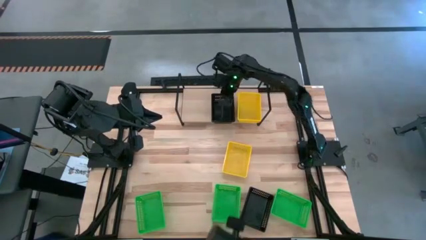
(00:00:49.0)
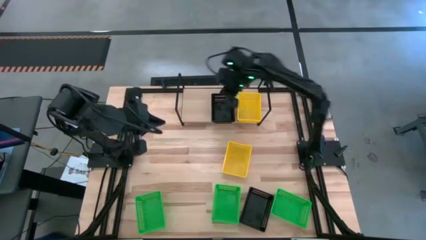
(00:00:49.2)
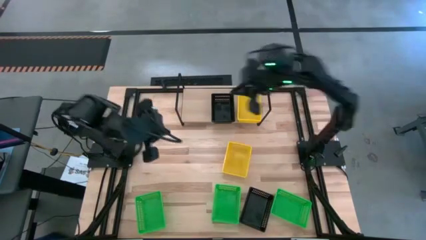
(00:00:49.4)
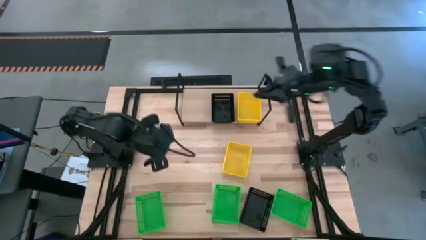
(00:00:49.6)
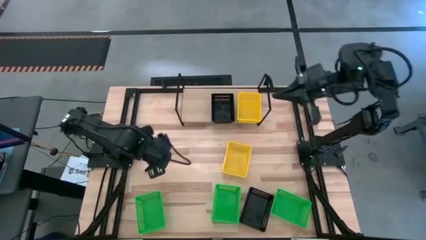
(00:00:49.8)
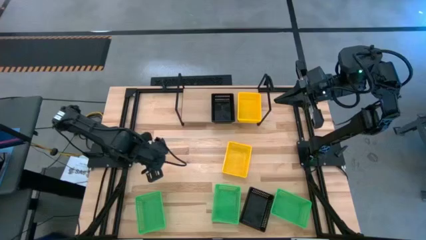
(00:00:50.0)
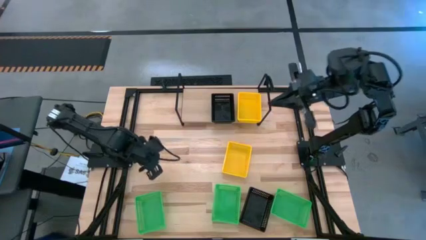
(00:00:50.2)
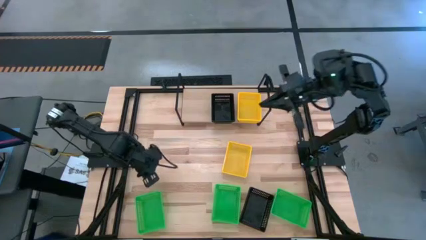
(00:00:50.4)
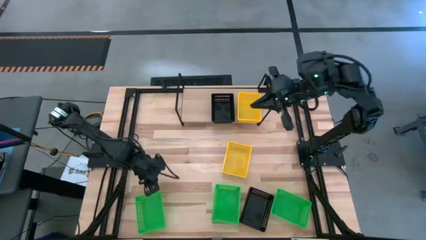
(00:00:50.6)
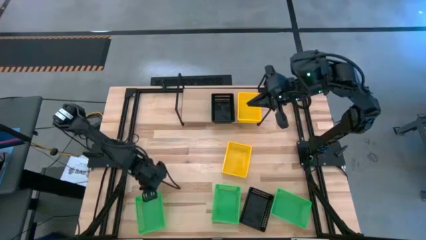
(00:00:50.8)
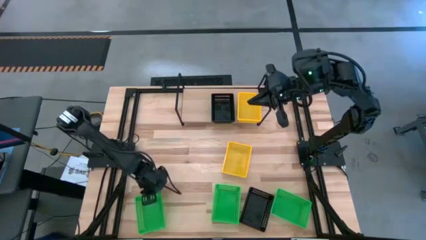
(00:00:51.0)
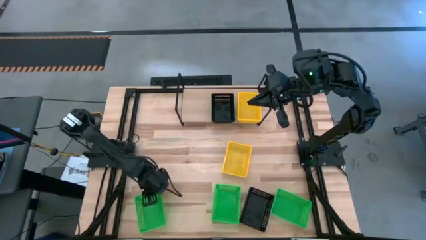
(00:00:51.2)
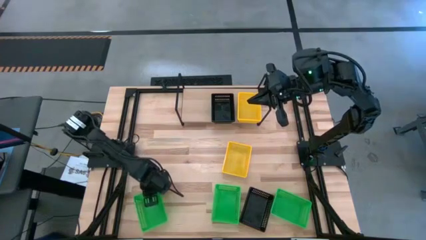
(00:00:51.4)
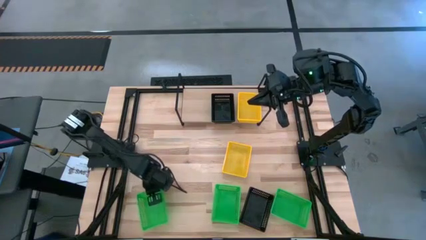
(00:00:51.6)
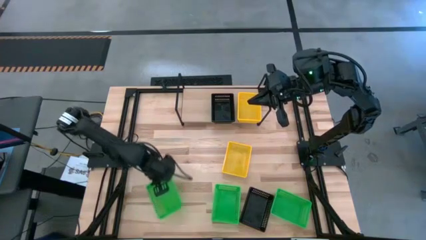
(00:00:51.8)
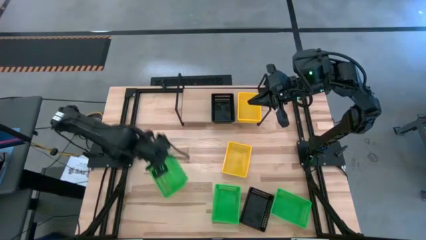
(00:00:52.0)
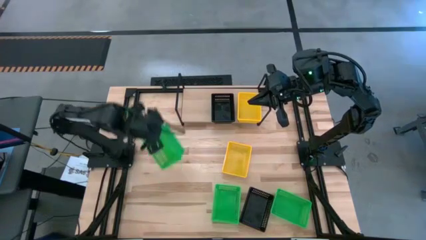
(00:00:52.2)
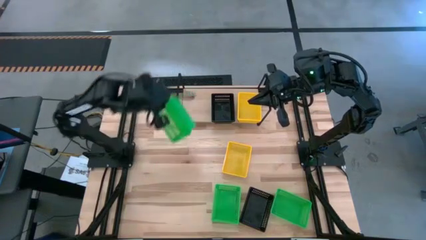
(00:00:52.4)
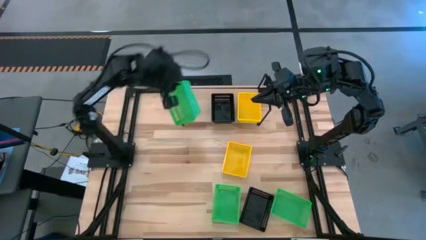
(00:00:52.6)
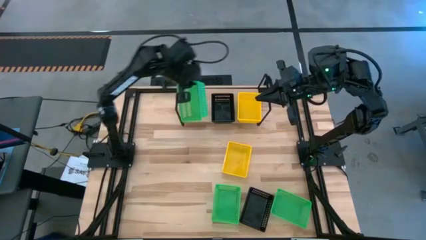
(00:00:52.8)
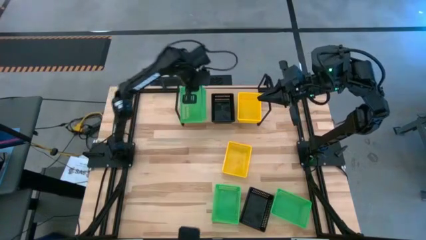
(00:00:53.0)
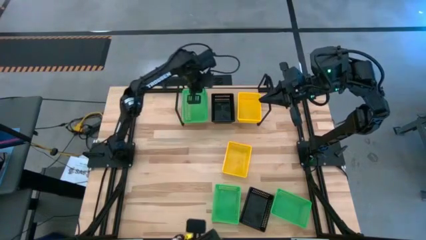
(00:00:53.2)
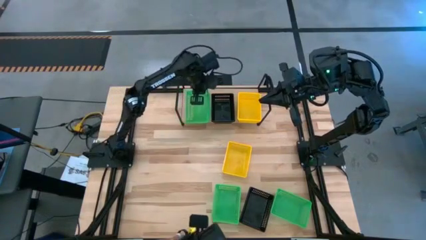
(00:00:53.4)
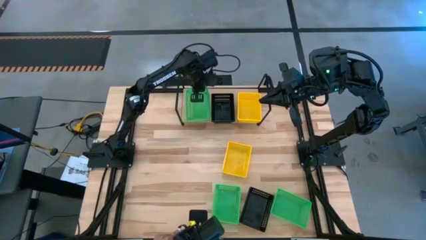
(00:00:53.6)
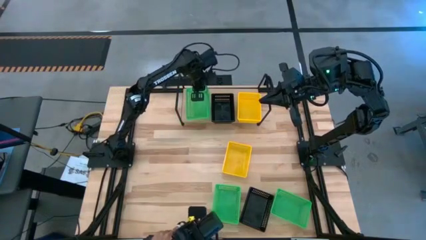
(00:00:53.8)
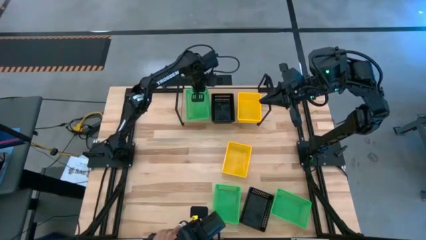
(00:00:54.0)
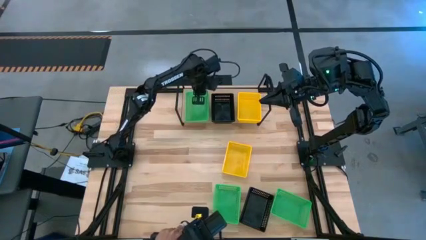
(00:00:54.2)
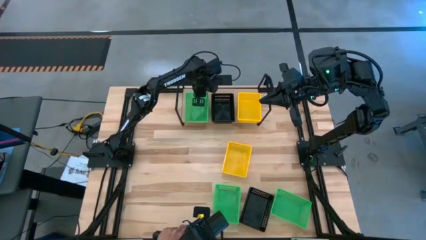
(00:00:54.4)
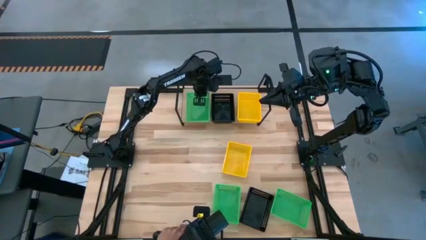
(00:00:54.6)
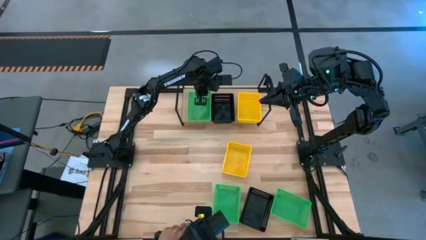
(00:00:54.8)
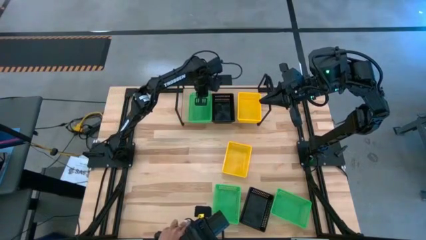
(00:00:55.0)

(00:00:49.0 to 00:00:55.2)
Task: Stack baskets on shelf by color
Put the bottom left green bin on the shelf

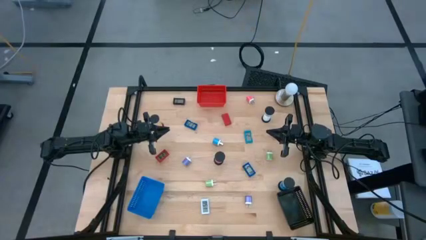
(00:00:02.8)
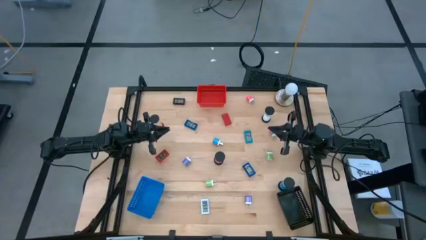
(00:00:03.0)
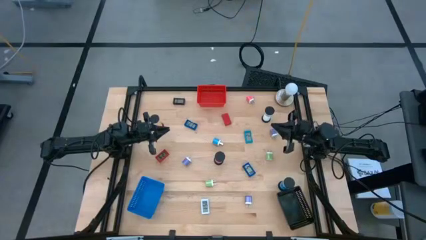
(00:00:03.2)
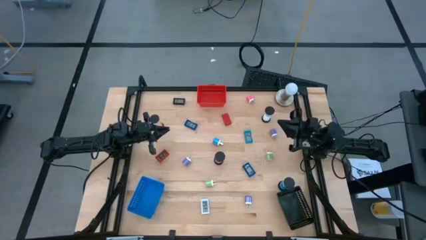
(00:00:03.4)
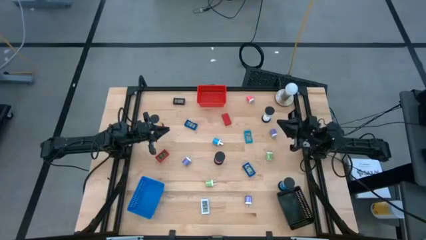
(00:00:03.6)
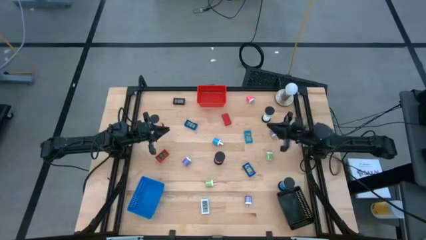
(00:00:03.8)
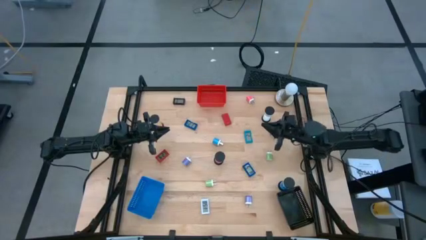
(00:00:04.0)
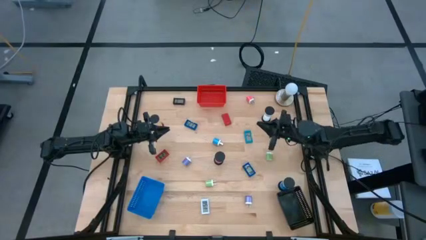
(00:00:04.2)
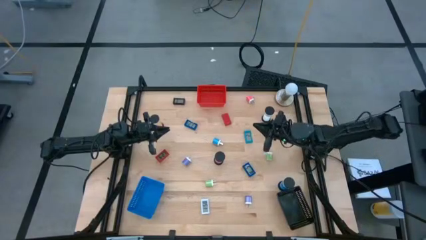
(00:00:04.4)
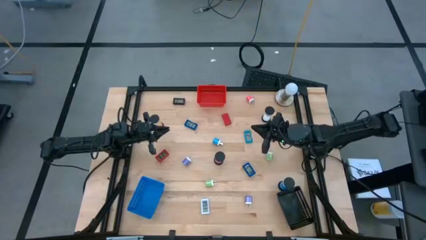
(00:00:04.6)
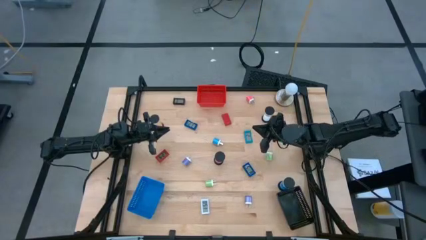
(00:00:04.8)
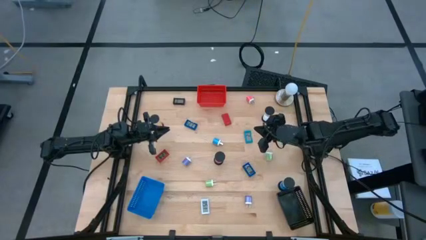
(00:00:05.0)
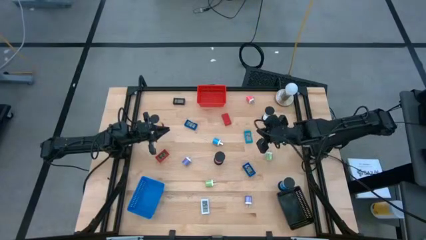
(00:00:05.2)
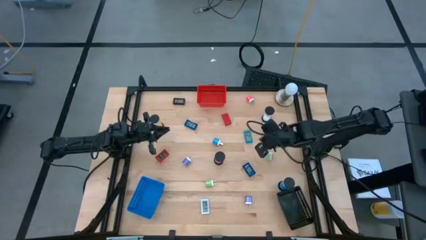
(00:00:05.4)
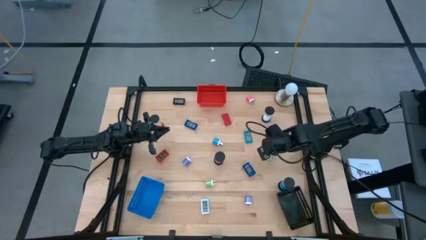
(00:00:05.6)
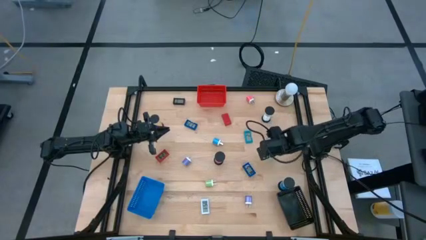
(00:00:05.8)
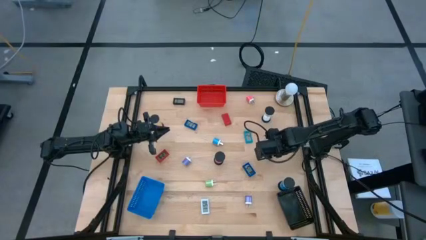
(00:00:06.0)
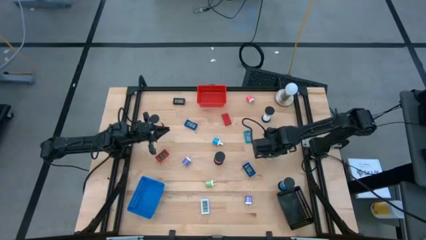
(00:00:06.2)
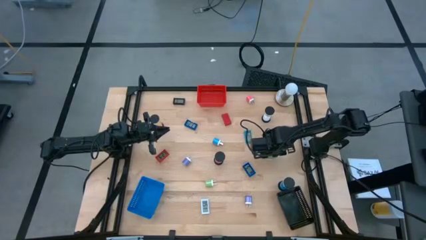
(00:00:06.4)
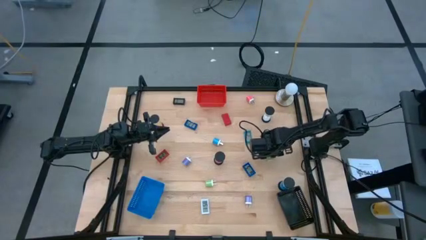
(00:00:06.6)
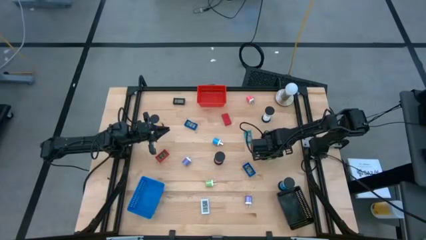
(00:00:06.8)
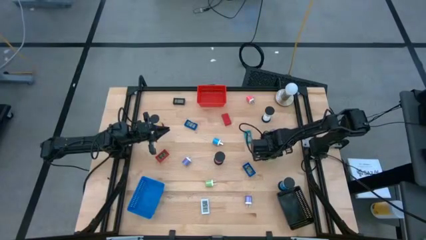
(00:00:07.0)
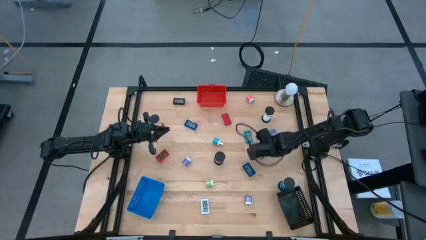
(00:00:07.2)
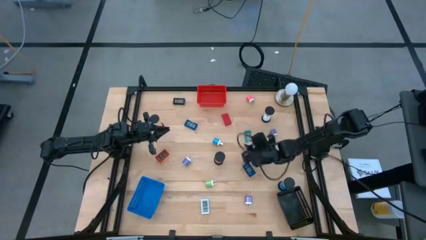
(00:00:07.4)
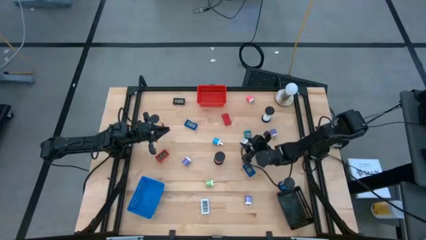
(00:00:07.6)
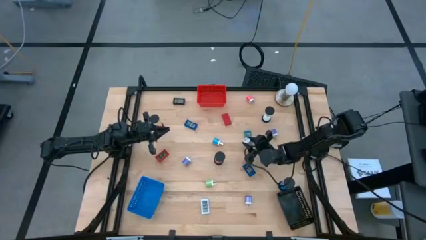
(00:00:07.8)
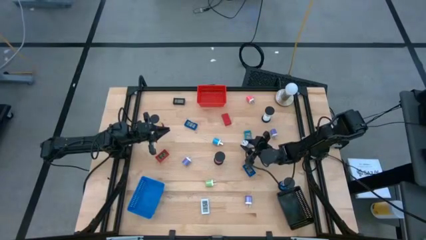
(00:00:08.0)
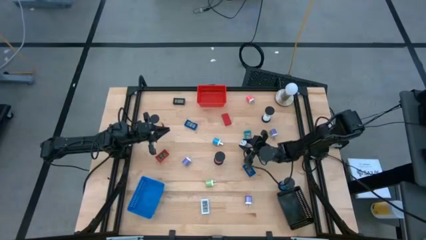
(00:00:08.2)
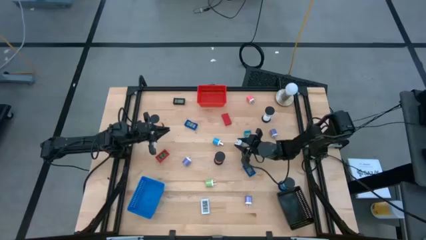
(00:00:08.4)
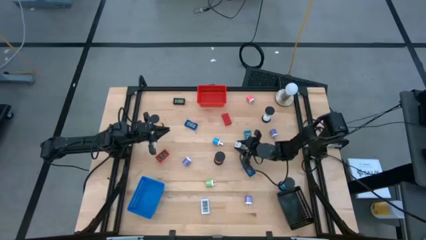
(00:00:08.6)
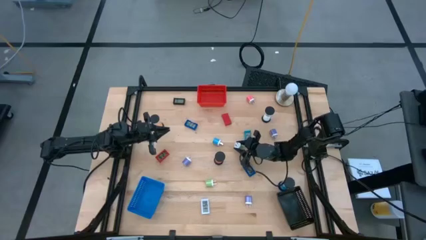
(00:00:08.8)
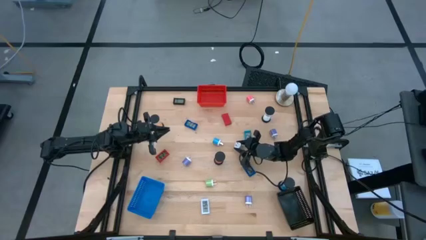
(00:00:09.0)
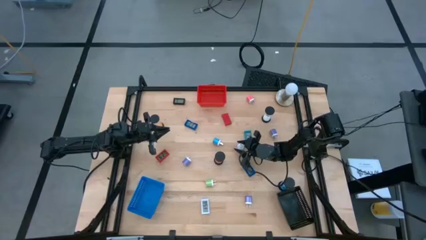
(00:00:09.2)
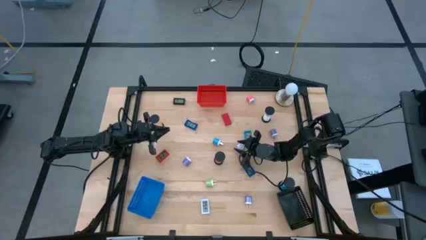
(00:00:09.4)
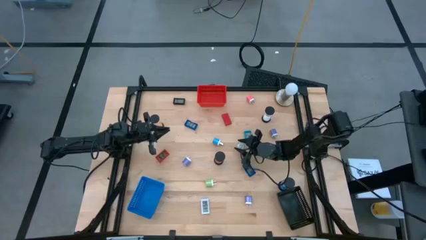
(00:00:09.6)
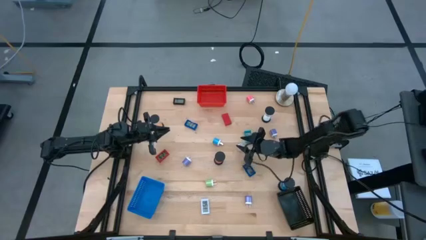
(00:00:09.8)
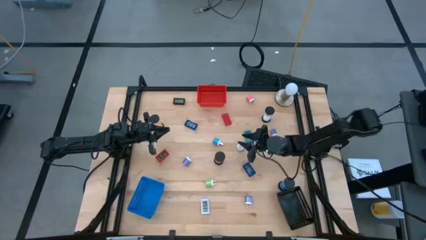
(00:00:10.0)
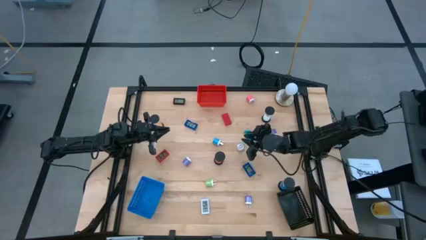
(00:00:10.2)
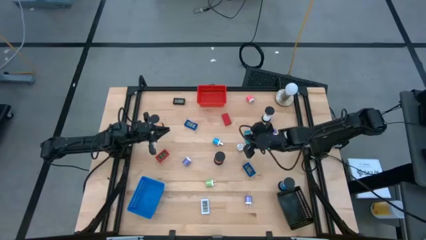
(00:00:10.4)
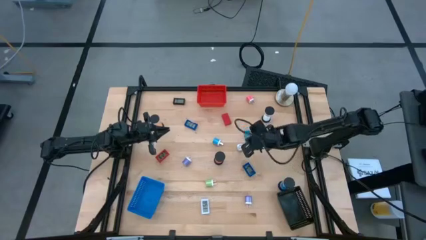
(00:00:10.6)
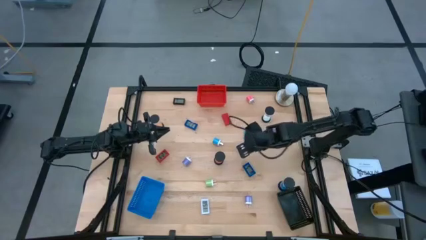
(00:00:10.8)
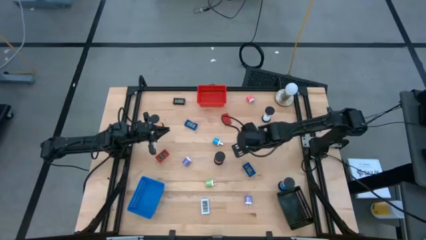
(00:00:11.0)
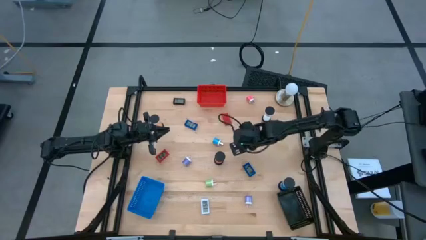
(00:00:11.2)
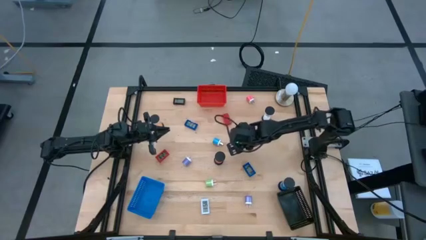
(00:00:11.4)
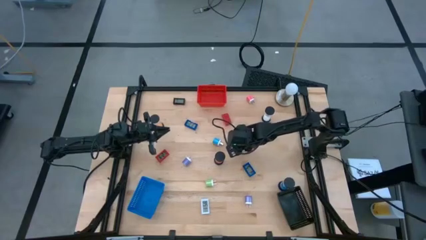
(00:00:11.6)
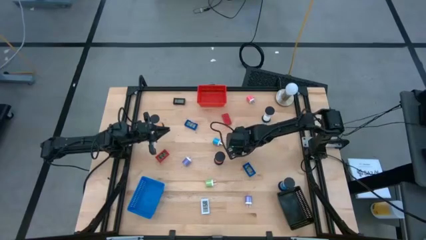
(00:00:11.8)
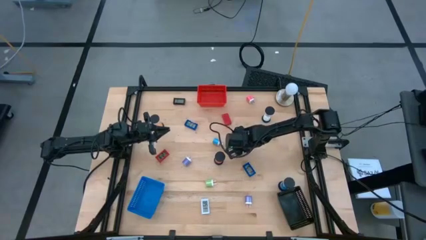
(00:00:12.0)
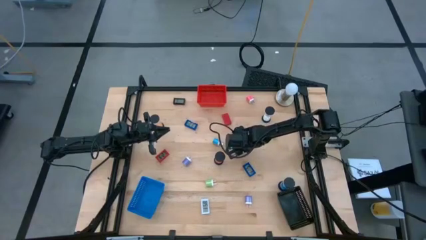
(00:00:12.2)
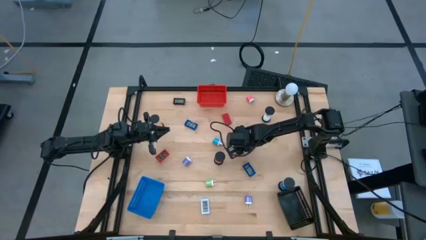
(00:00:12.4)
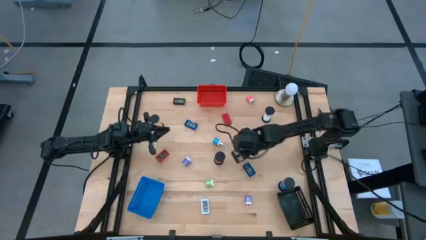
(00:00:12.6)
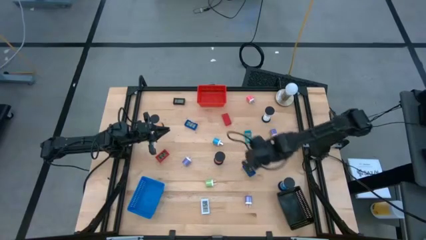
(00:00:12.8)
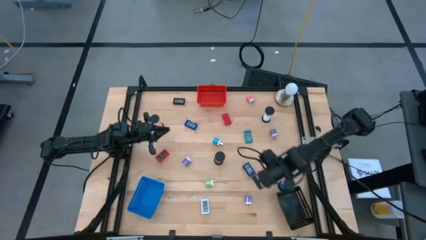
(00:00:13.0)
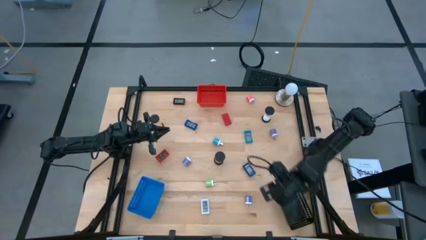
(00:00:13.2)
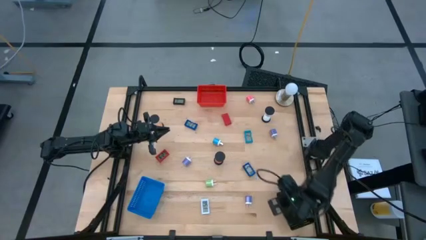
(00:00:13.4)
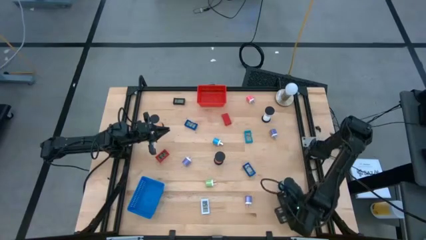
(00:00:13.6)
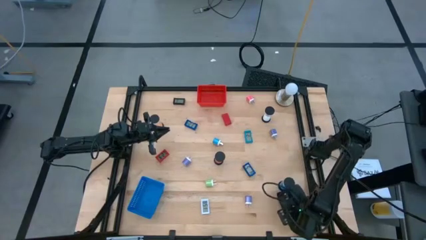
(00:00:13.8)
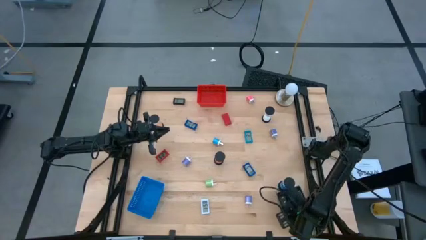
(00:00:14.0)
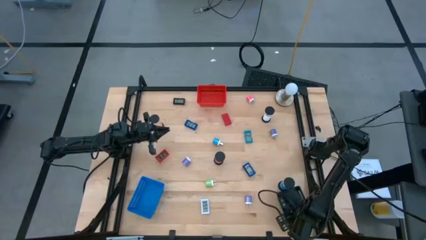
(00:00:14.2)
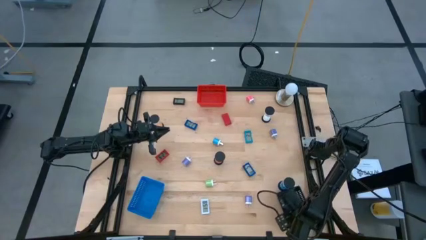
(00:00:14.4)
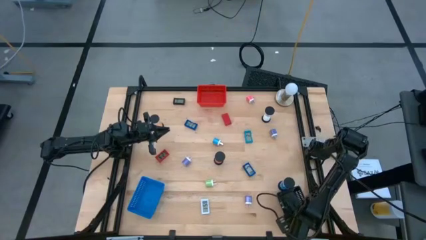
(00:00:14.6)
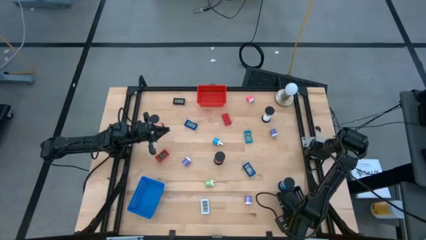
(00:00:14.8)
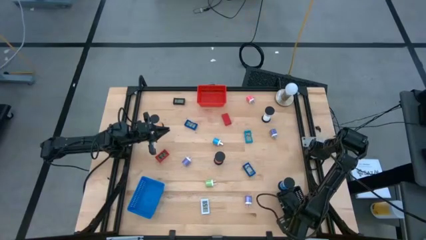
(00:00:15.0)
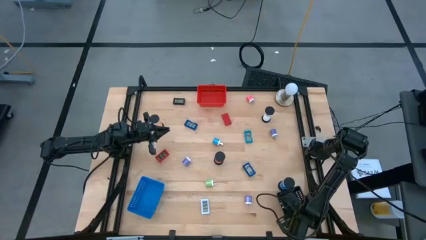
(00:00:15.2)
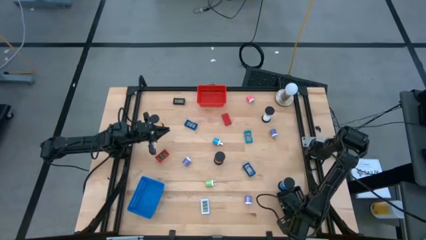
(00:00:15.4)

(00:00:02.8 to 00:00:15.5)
Task: Pick & Place Office items
Put the top green charger adapter into the black bin
